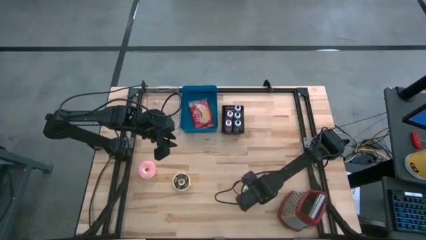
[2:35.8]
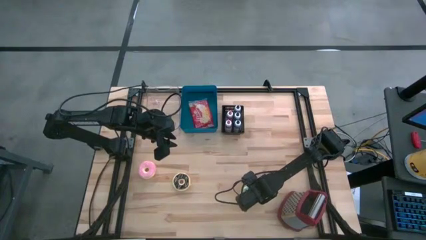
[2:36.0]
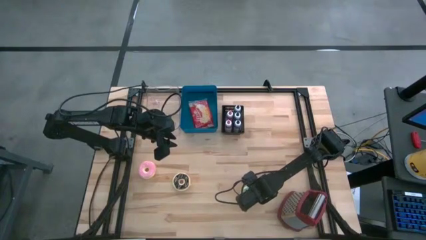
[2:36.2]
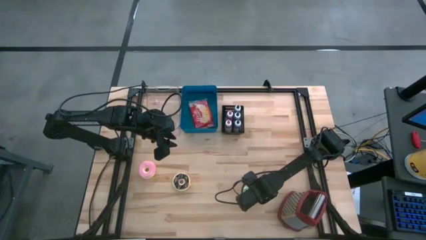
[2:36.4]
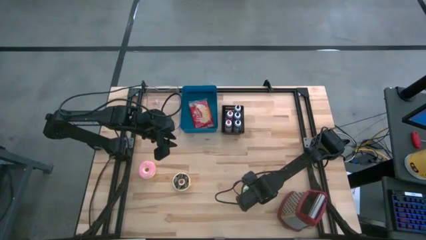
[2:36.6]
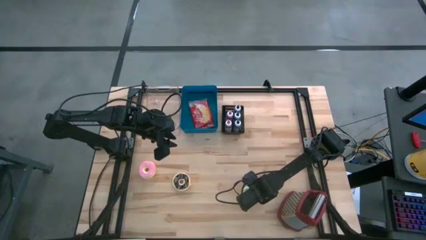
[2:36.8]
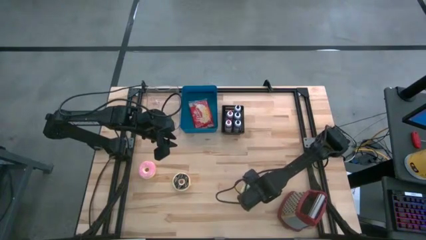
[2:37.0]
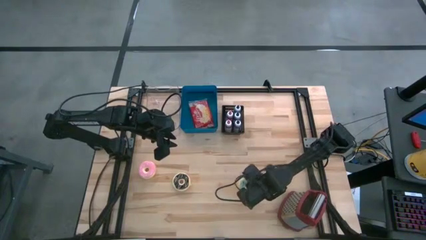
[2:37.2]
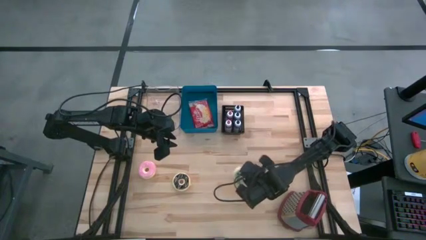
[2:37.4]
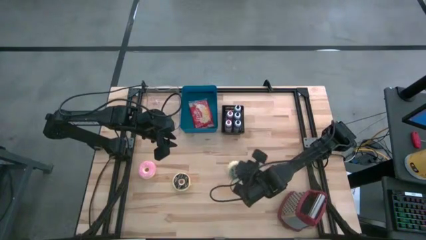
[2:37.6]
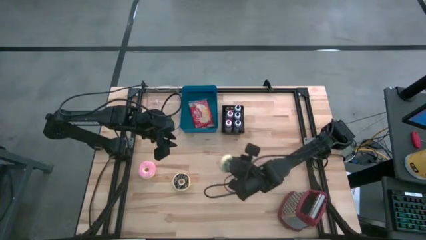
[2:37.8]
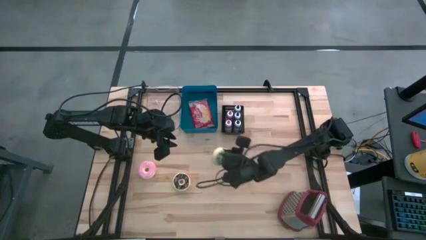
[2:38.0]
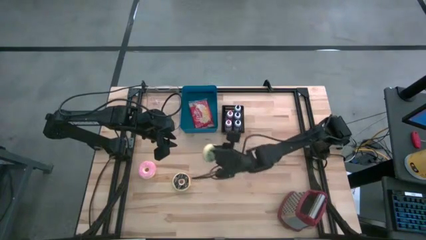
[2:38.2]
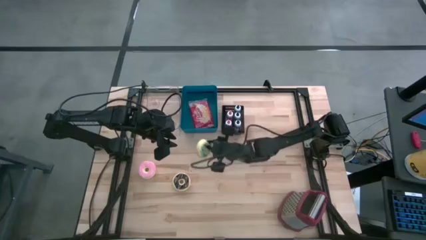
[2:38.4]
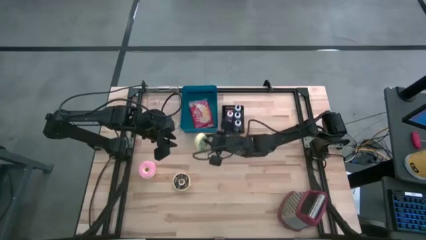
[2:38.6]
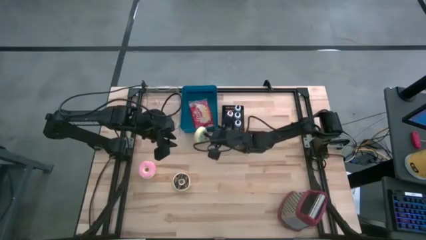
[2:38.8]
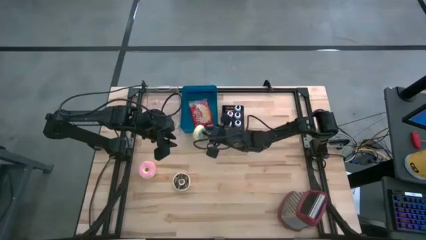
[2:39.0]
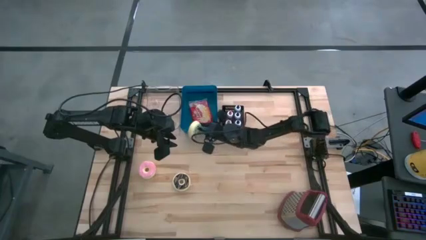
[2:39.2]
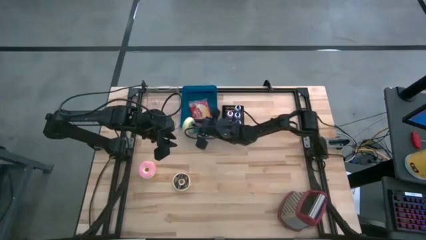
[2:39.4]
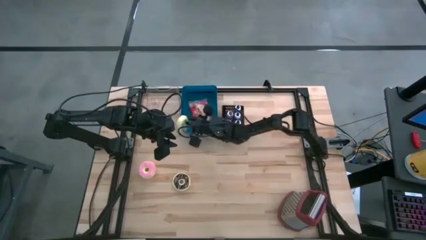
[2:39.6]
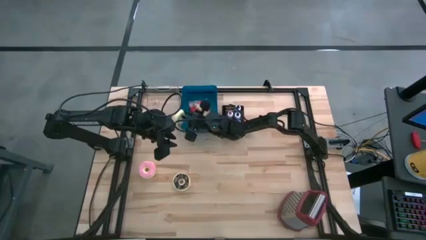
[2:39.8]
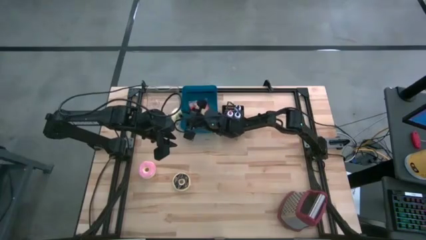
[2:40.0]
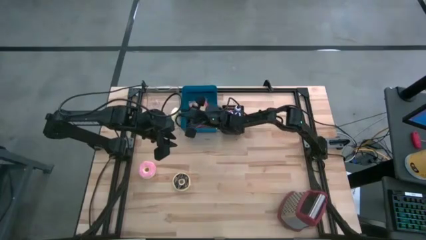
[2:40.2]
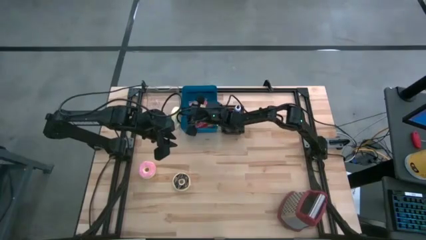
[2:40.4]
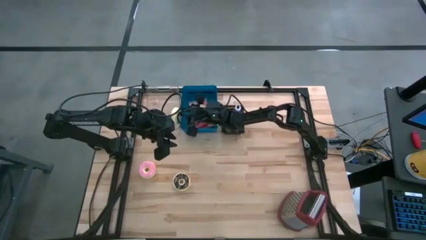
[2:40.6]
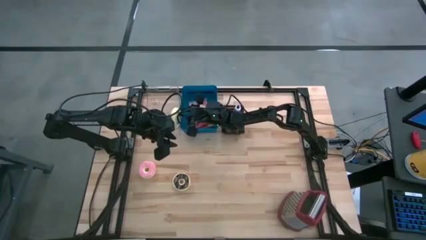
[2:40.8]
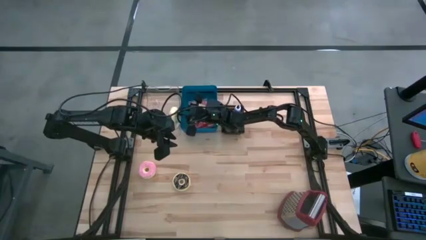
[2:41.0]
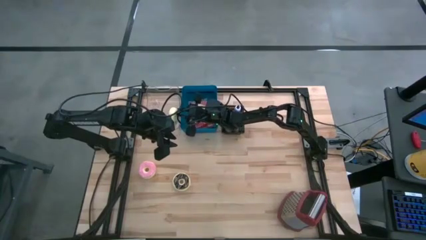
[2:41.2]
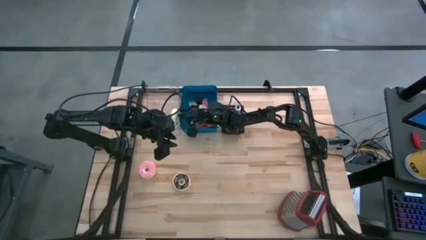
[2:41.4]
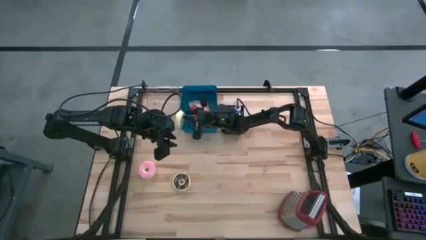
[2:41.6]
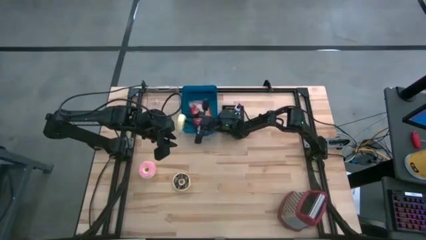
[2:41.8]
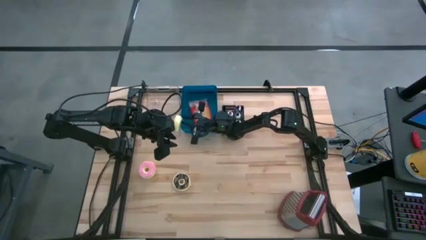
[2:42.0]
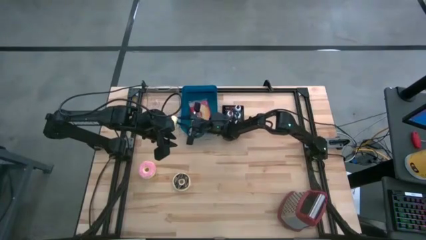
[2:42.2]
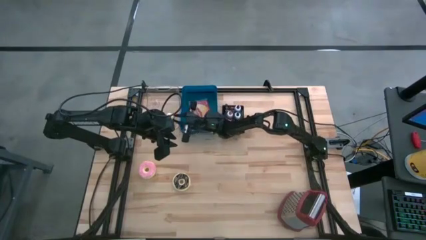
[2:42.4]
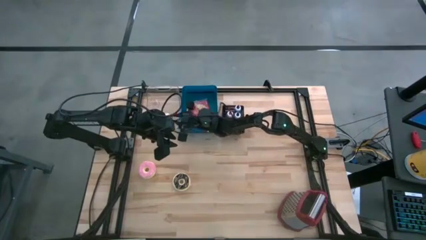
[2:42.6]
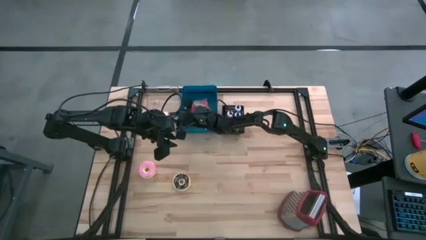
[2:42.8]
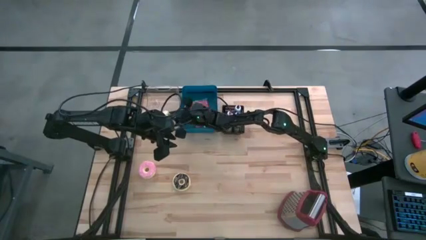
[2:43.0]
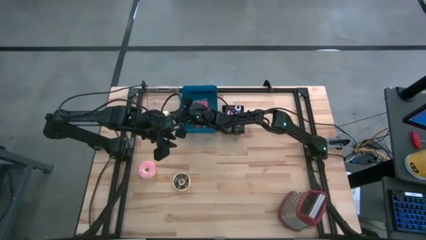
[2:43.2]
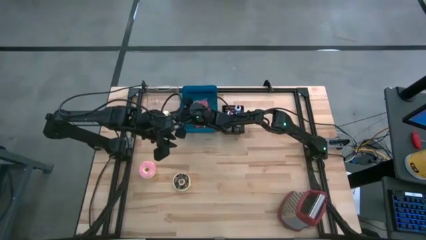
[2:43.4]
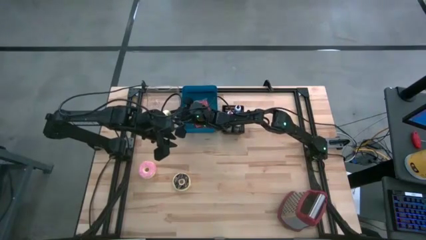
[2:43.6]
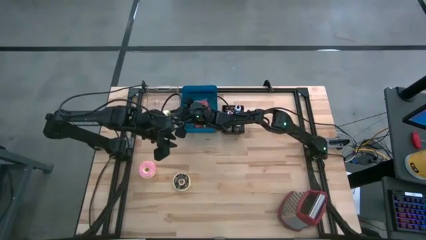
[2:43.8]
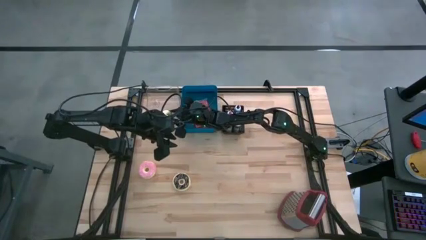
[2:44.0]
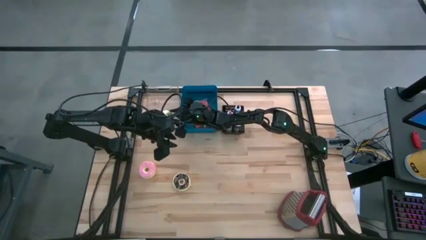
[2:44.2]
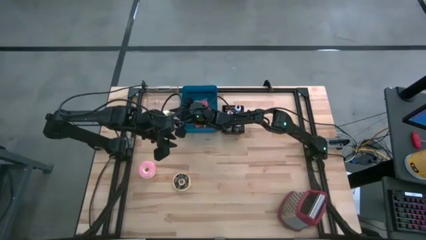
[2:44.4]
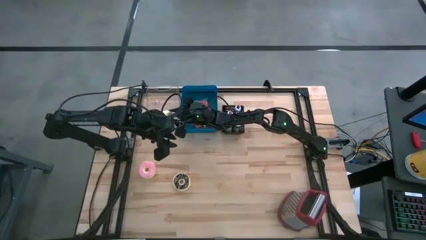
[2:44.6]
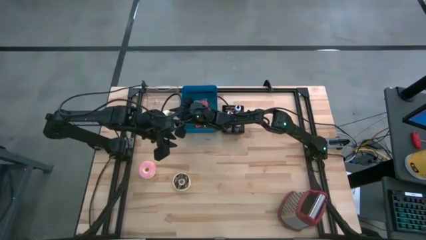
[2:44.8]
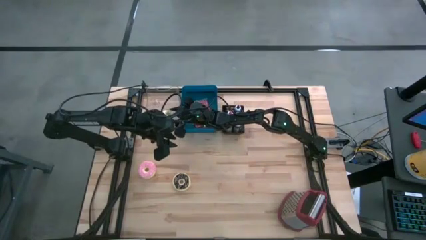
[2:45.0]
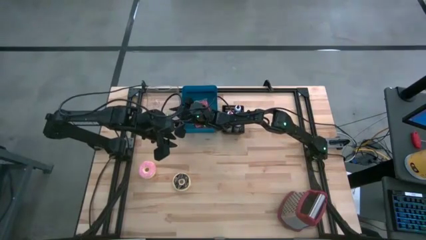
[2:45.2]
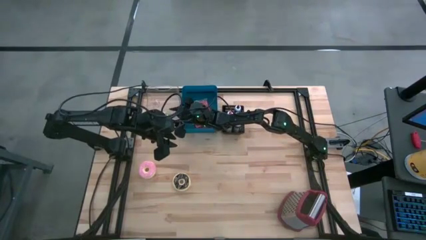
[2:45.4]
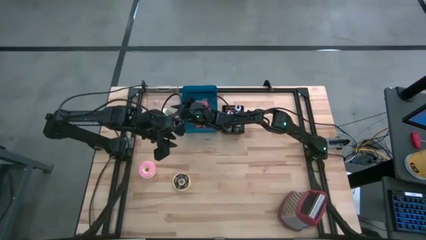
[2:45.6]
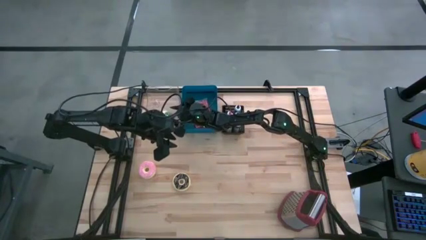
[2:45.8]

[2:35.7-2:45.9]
Put the green donut into the transparent bin
